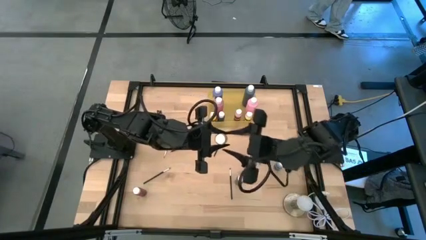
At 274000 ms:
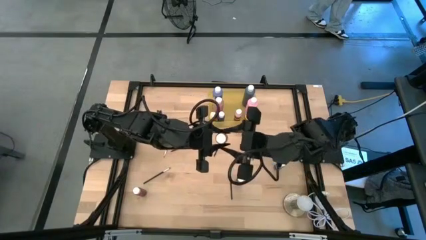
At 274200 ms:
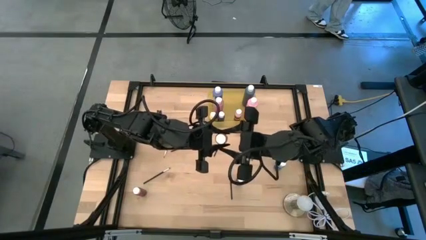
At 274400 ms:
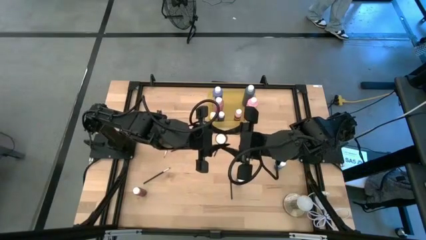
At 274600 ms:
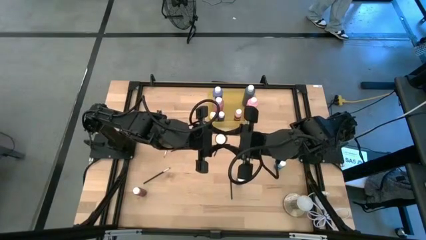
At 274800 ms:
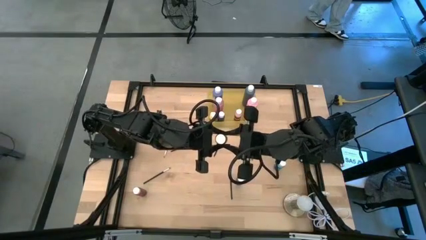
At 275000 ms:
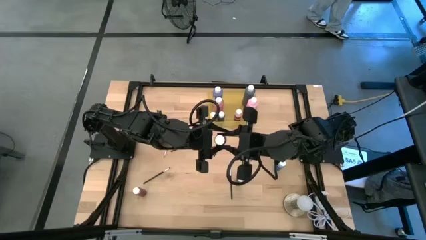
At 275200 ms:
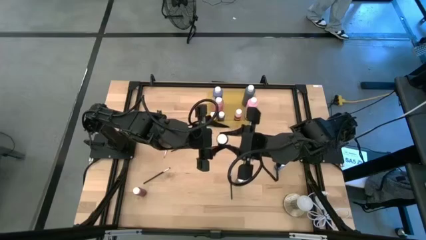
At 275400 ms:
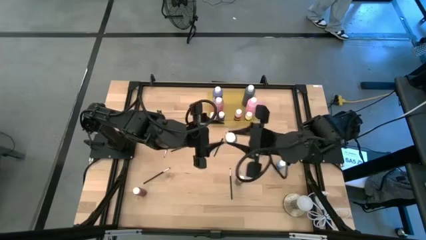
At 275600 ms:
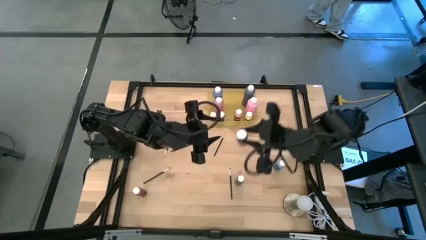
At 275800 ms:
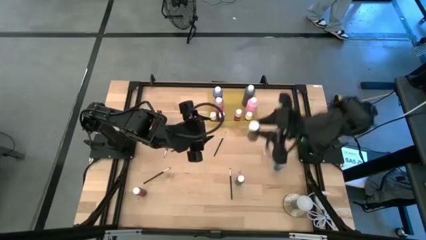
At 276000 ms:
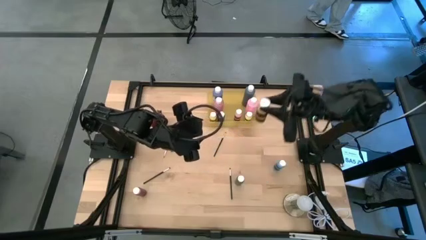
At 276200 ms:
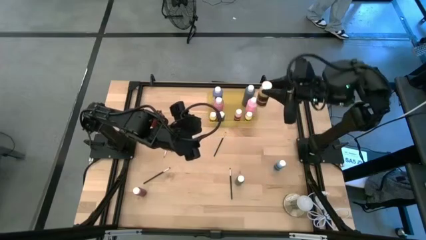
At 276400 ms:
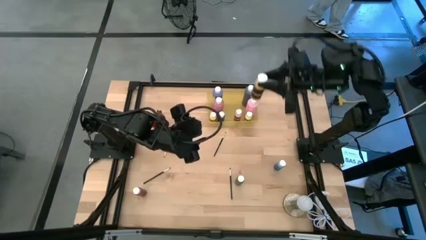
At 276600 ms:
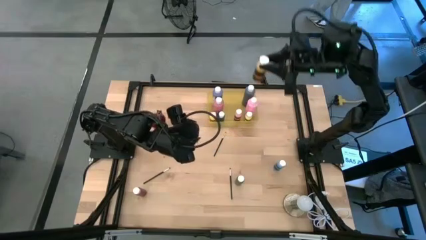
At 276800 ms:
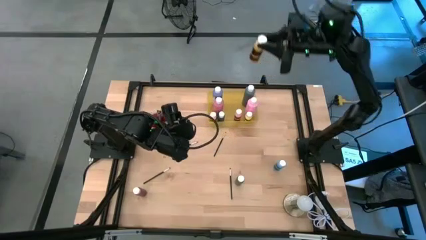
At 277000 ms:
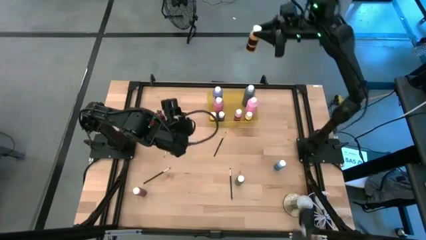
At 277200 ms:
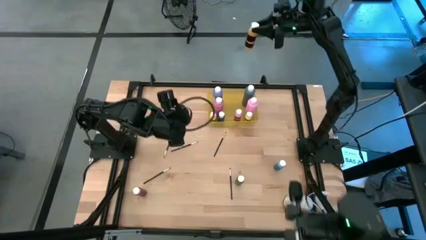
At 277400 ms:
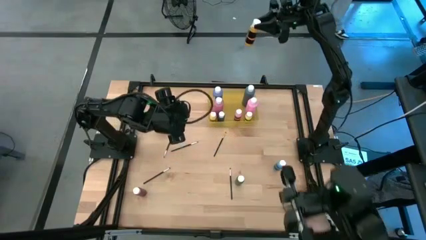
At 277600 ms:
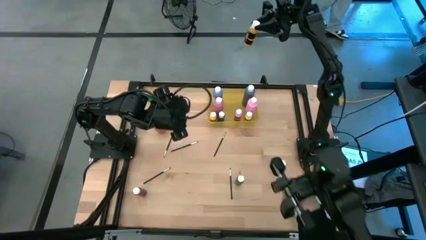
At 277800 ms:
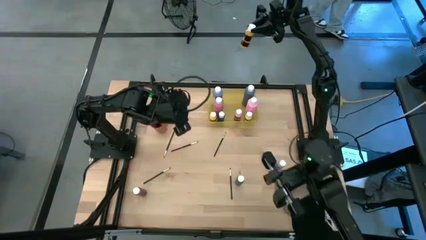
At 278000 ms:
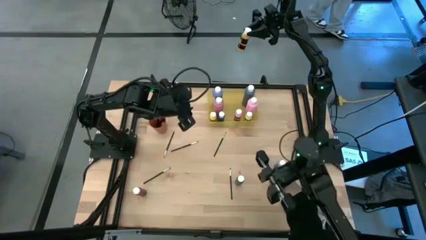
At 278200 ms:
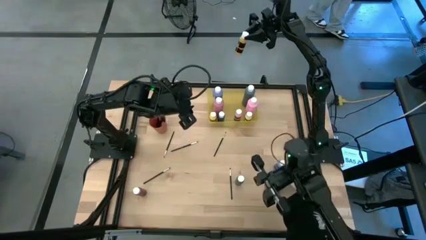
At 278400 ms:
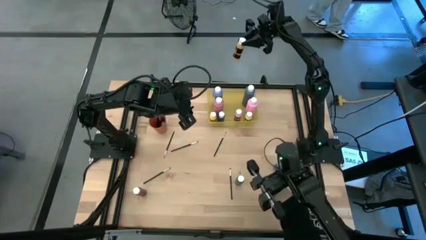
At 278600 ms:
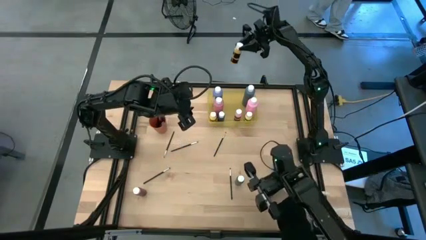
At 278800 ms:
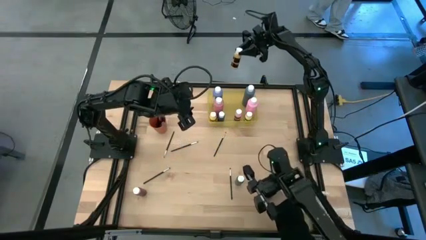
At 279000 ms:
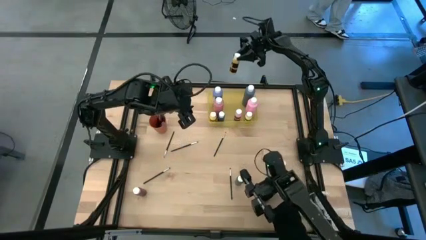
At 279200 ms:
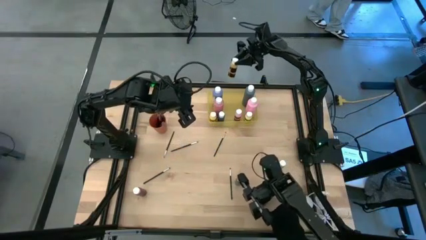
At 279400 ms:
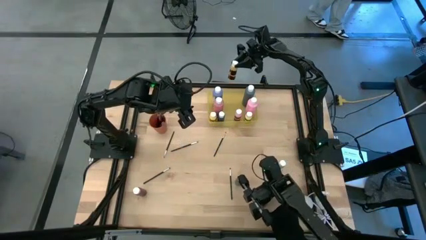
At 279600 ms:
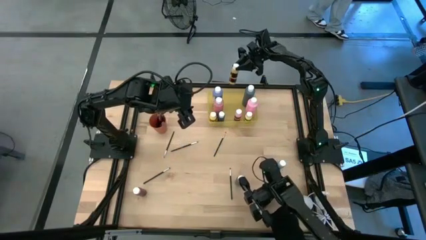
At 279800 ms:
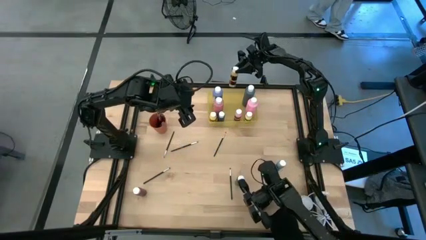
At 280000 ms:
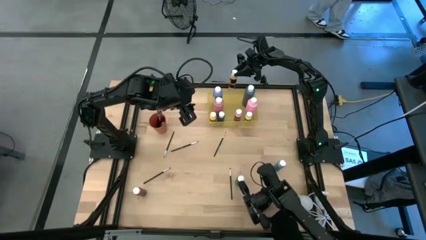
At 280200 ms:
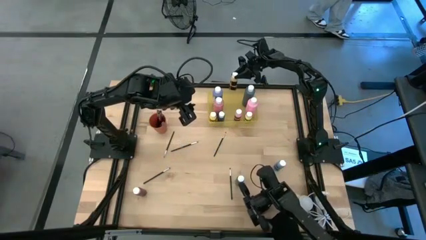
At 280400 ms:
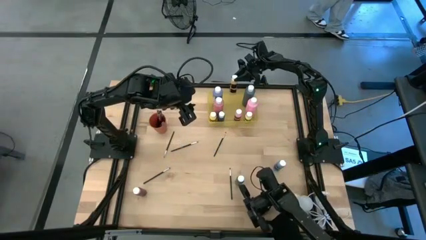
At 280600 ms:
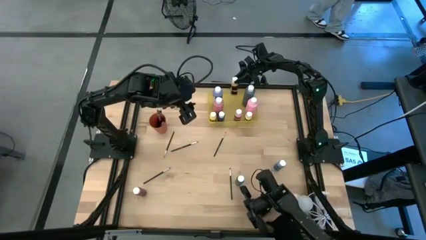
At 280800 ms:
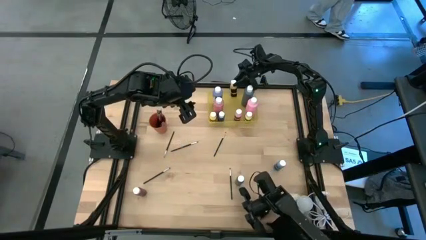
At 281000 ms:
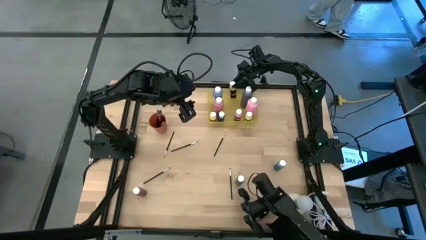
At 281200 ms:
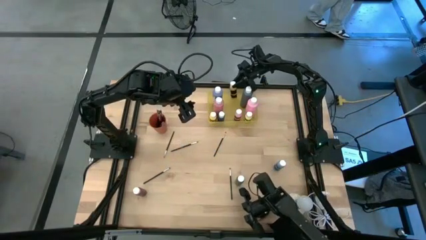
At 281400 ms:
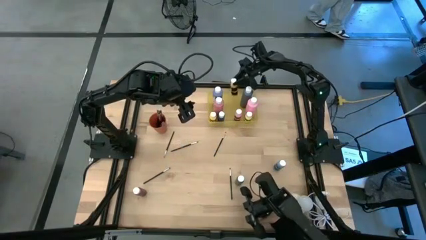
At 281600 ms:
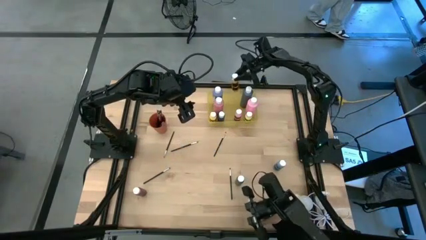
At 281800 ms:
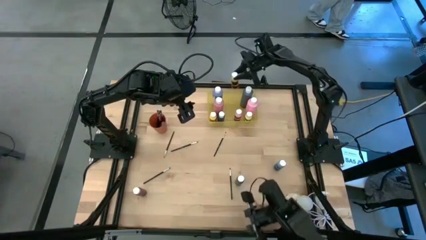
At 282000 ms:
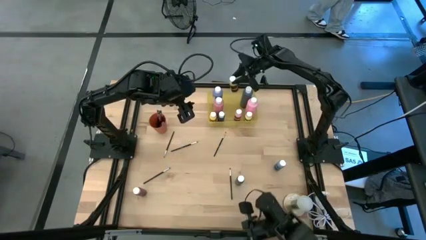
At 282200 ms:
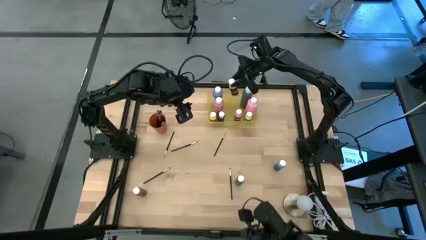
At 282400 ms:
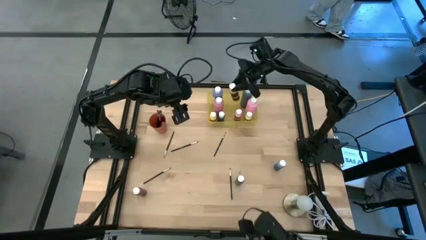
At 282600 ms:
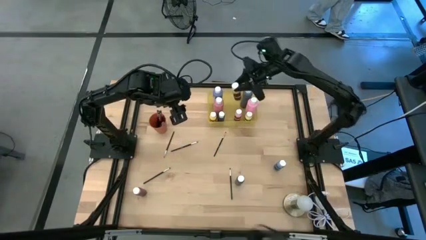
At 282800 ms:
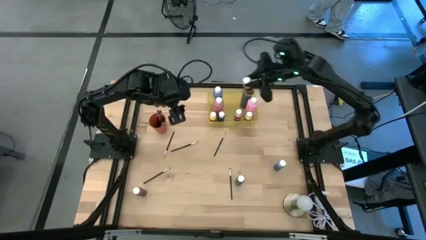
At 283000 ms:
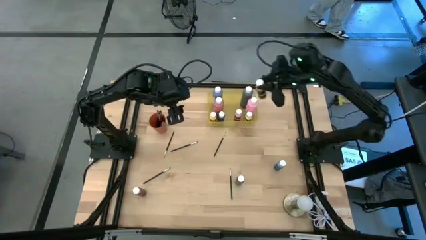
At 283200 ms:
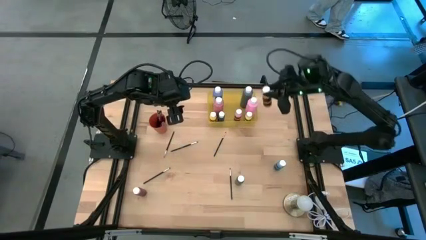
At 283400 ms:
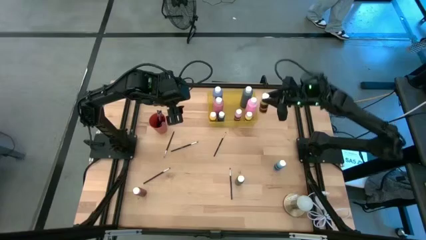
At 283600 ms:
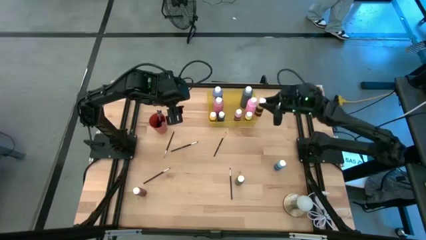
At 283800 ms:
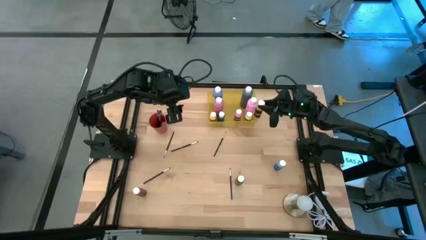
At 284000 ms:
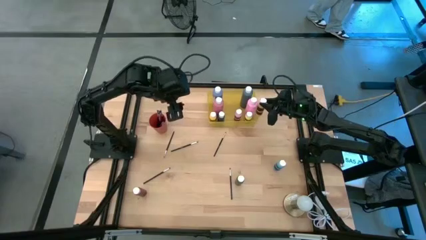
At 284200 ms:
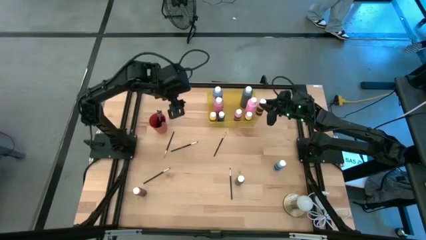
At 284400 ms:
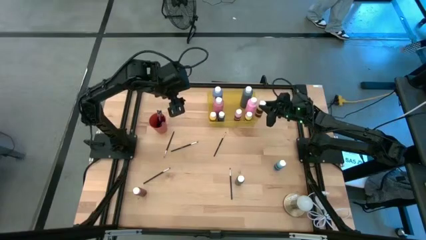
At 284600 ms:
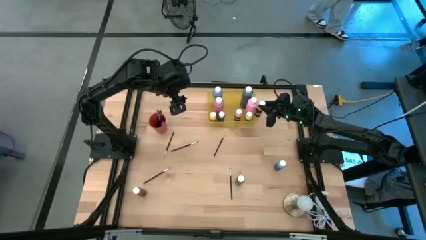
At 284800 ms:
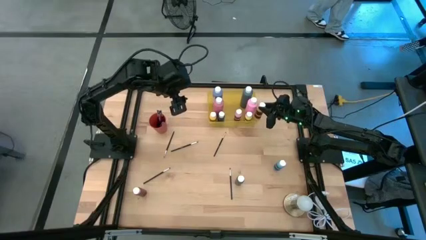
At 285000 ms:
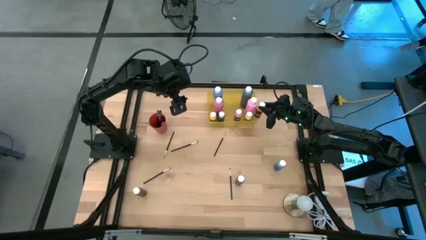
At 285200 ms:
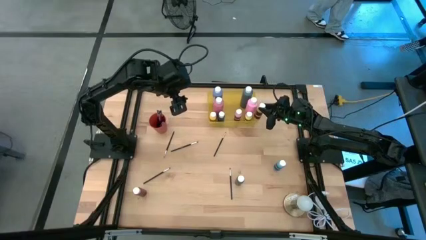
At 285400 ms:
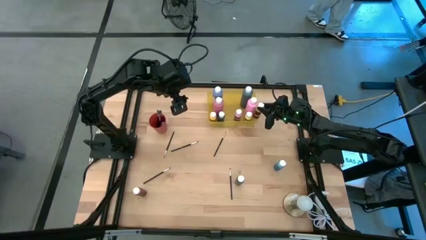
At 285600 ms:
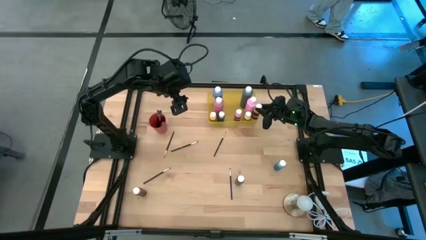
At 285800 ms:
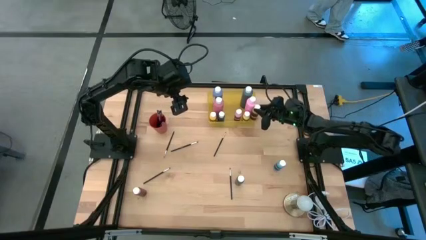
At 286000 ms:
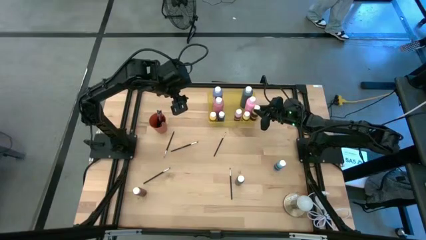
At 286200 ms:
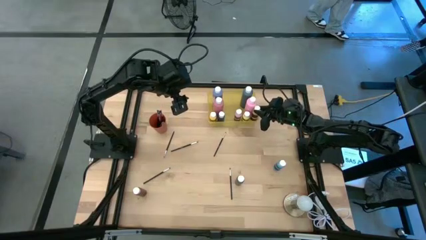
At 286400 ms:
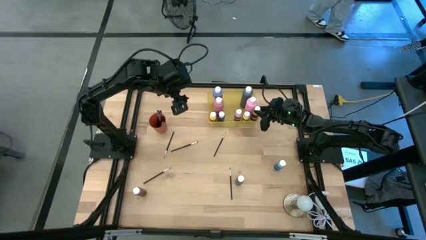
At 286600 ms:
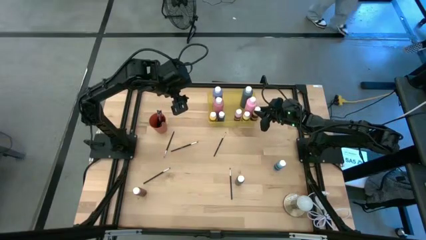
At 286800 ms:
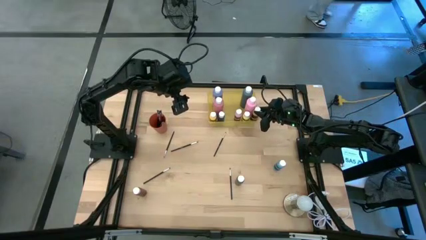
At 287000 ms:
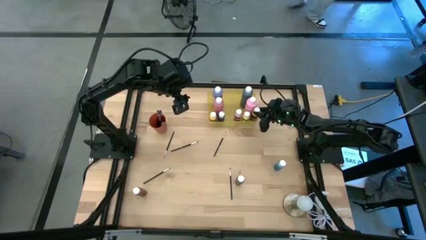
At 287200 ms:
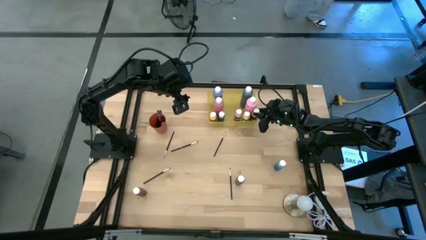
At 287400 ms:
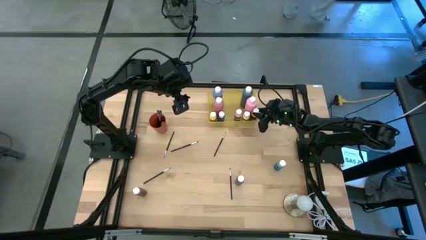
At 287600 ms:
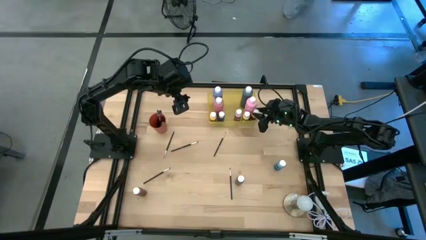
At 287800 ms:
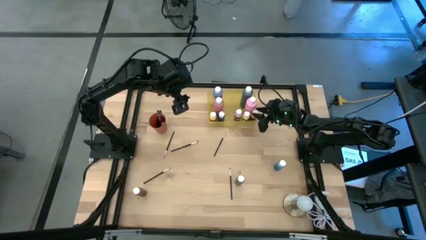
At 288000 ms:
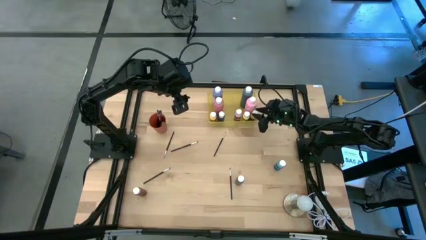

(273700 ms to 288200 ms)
Task: Pick & Place Paint Supplies
Put the small yellow paint bottle into the yellow bin

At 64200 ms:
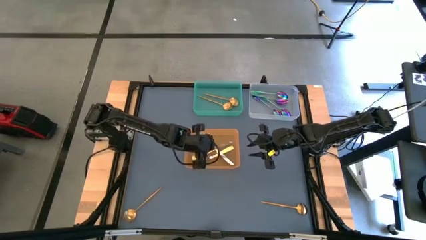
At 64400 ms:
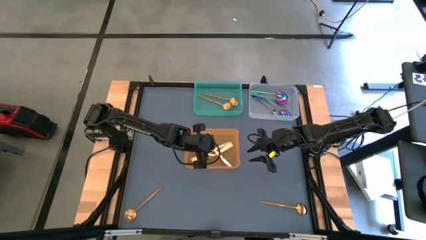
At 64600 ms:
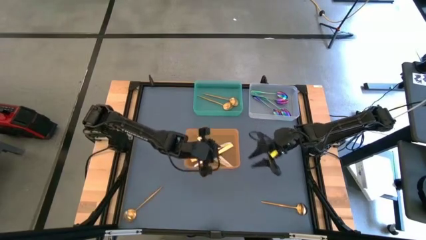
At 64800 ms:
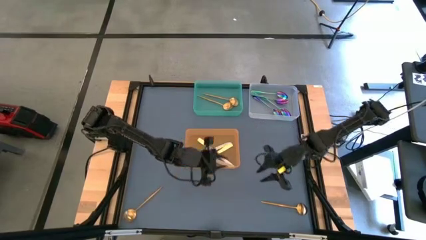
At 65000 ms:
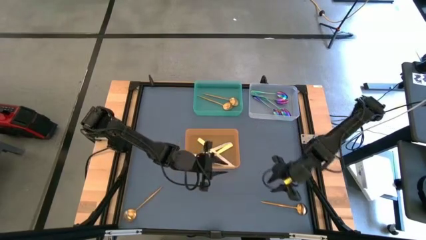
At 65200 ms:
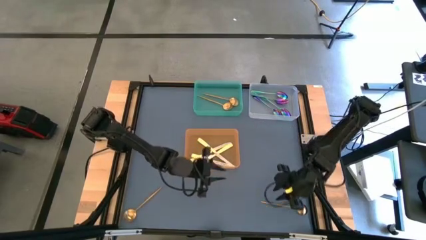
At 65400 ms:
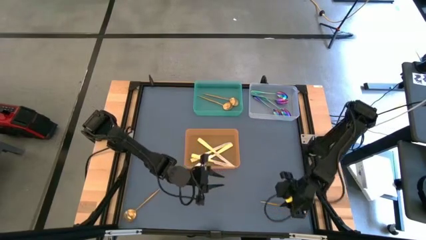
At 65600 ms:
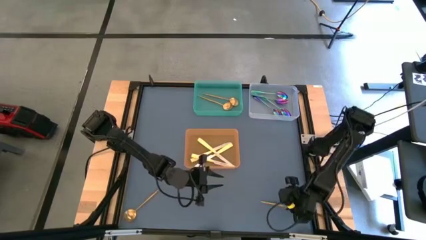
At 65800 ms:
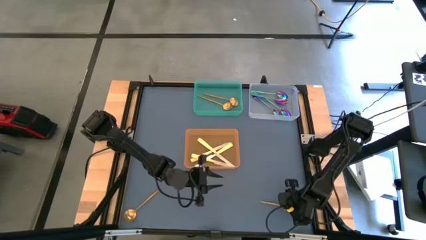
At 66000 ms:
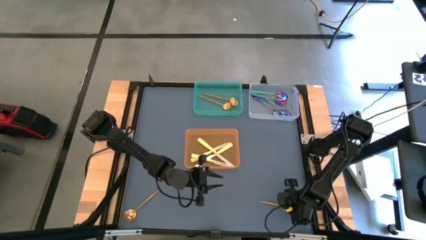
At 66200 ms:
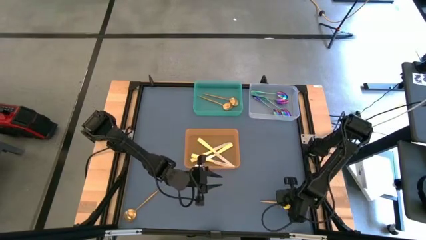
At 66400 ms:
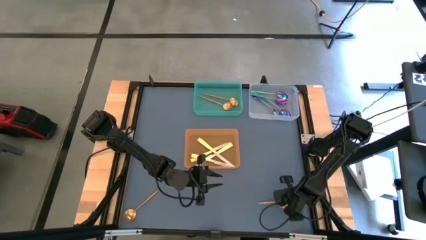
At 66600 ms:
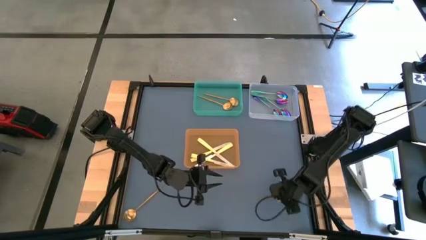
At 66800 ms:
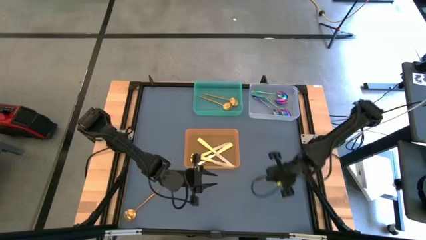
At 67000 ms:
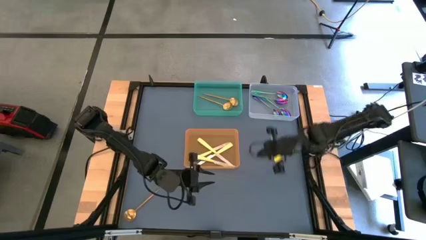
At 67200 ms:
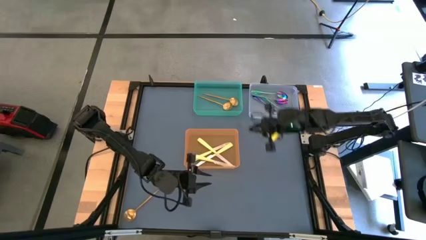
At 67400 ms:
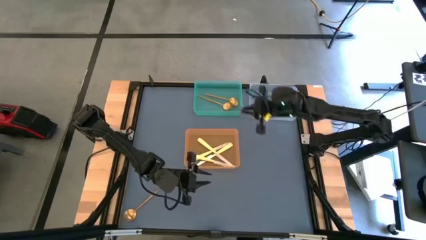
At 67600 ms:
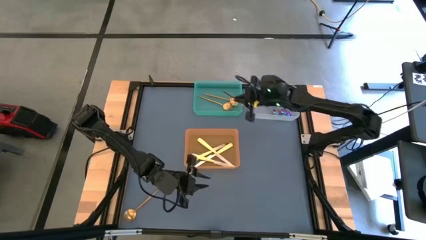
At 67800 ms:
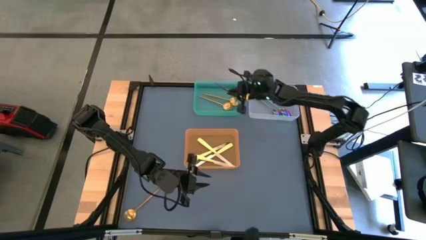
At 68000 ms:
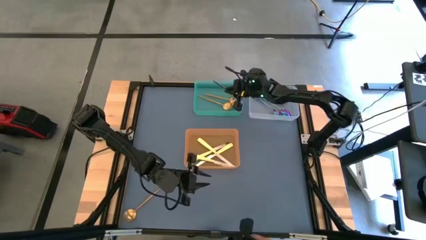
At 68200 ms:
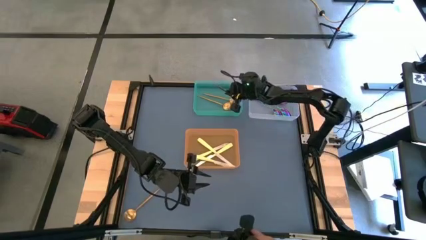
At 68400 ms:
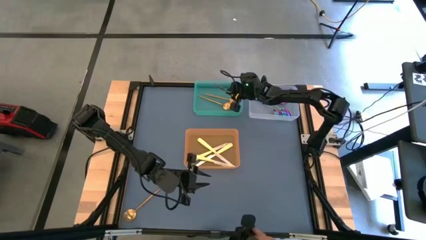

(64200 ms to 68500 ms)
Task: Sort silverware by color (type)
Put the gold spoon into the green bin
